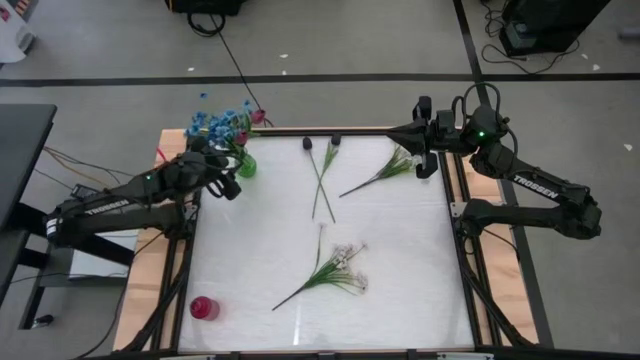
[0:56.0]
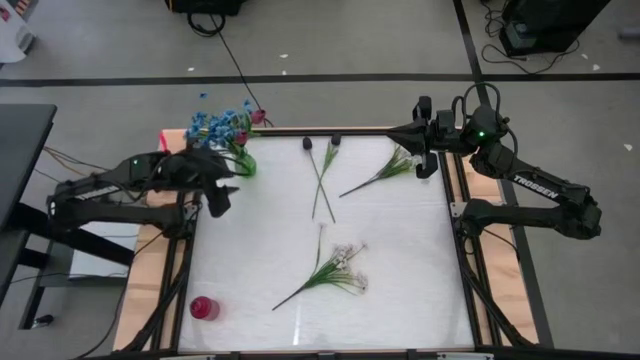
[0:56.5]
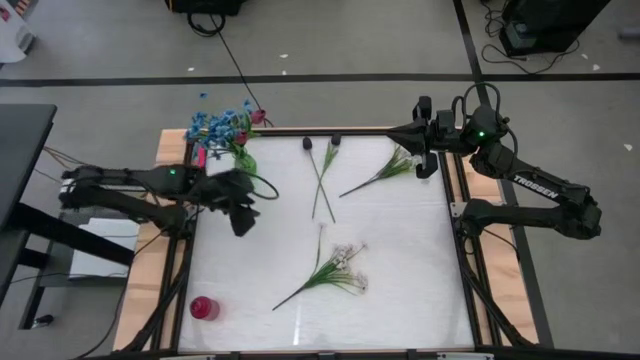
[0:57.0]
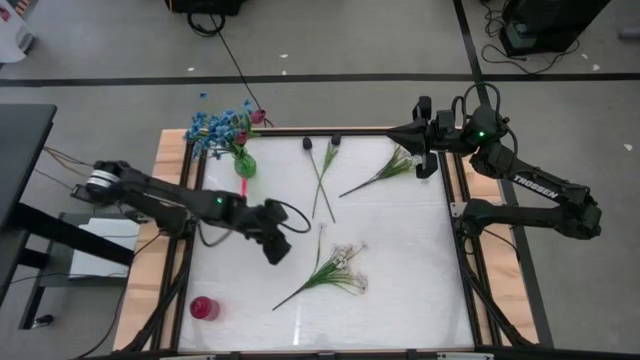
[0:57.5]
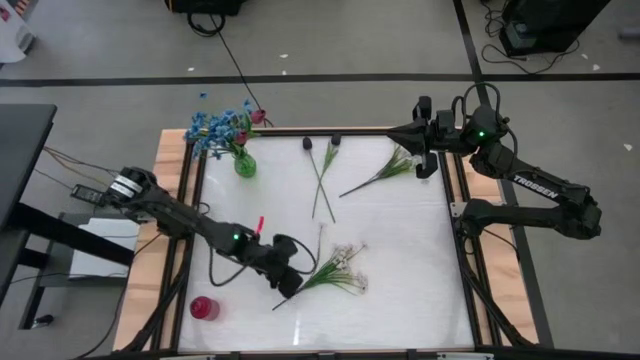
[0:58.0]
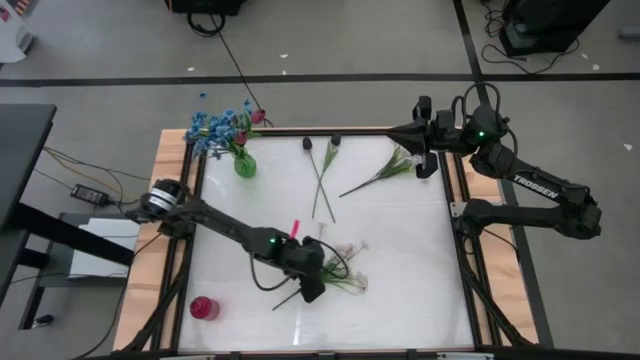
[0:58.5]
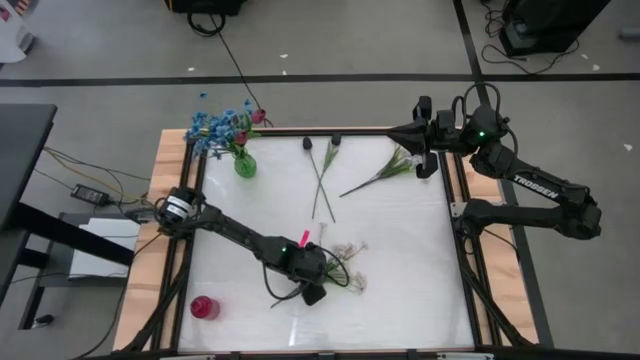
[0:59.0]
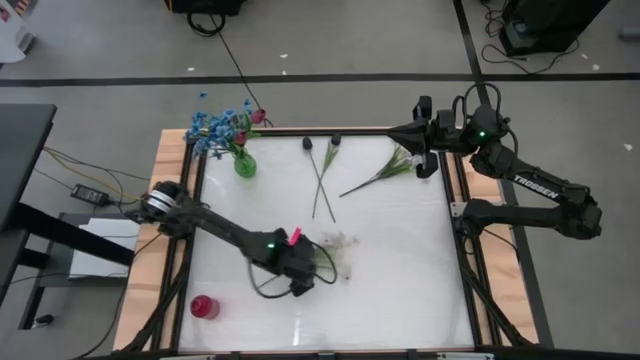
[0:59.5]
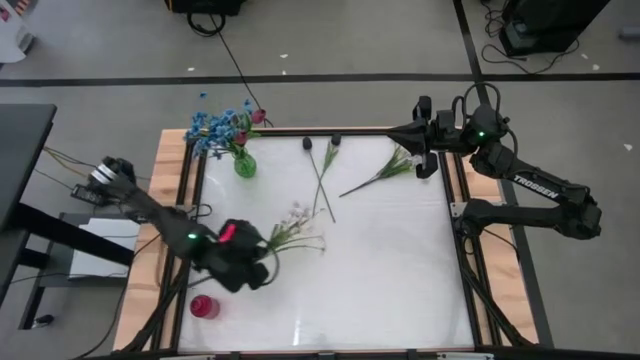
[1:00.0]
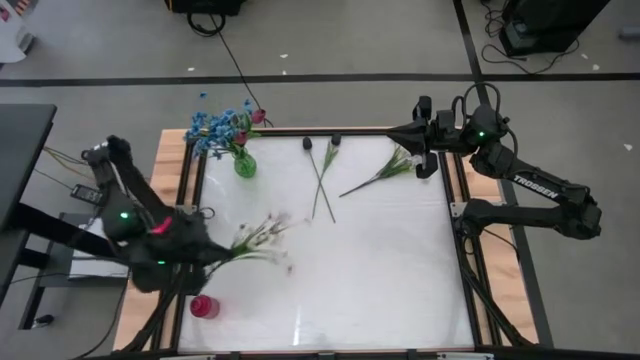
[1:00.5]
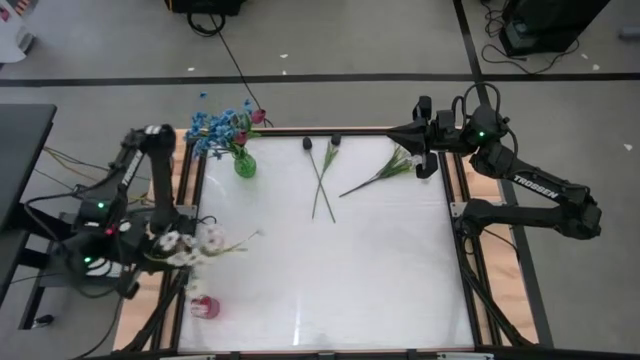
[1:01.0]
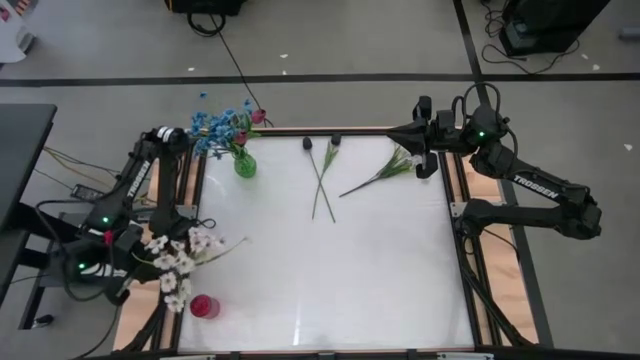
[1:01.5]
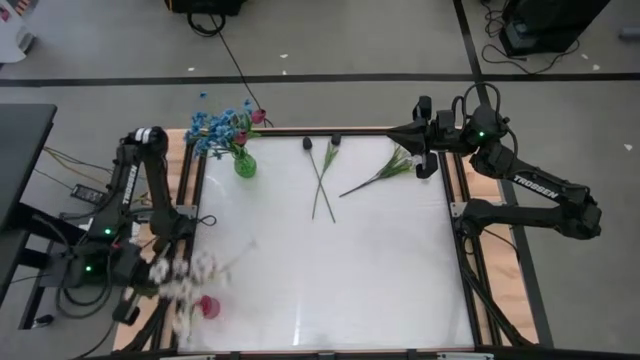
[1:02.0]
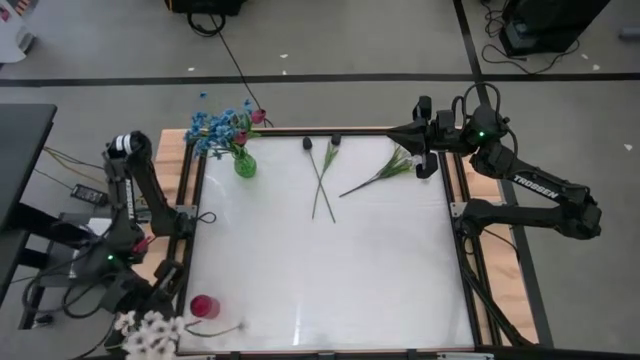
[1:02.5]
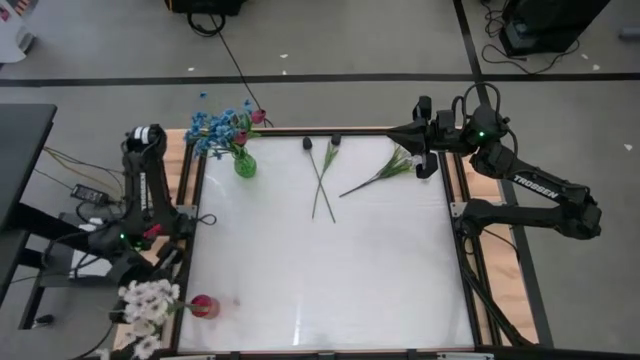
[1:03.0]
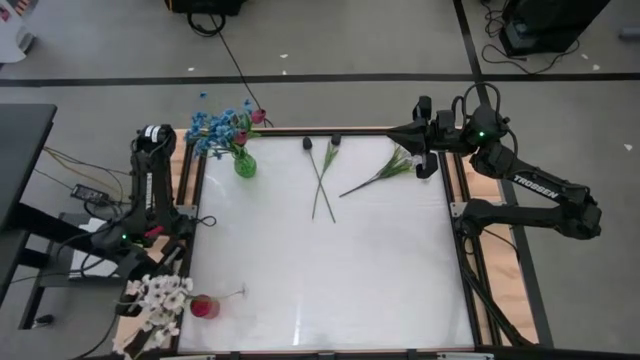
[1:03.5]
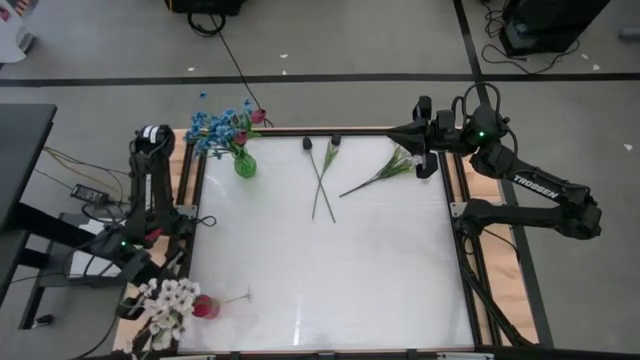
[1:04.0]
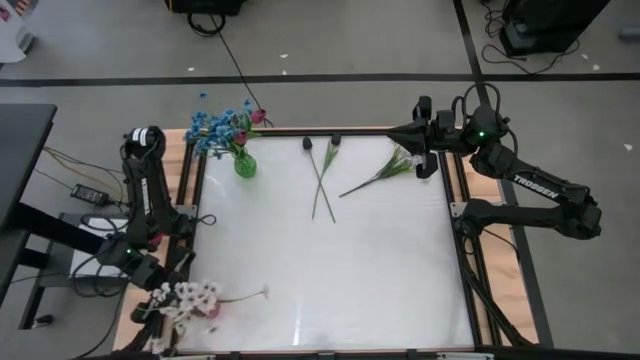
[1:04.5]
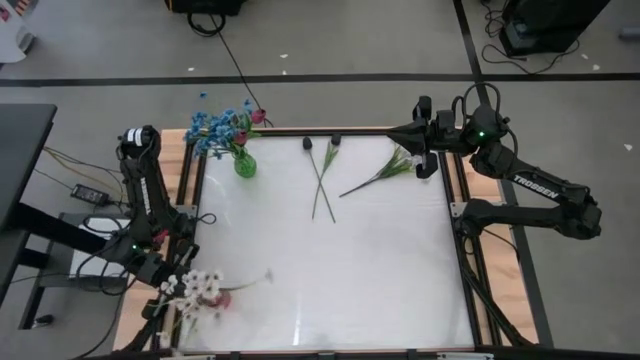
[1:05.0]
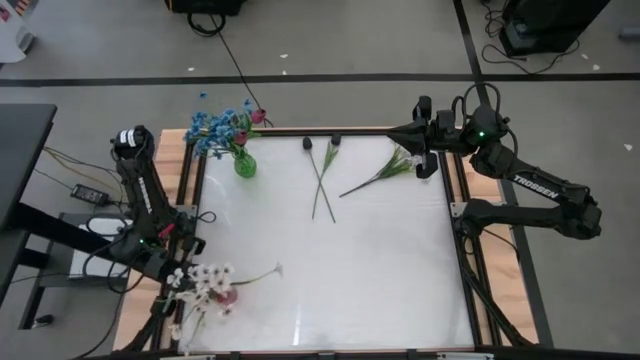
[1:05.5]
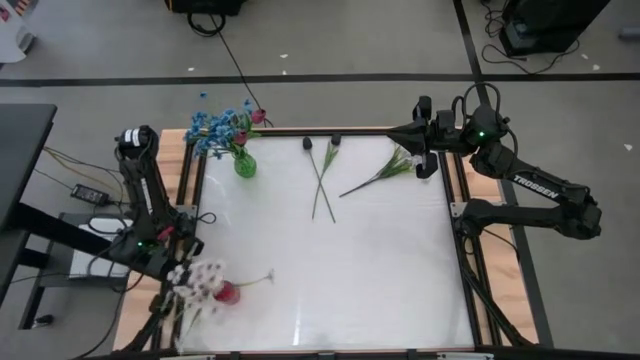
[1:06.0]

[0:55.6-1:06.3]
Task: Sort flowers into vase by color
Put the bottom white flower into the red vase

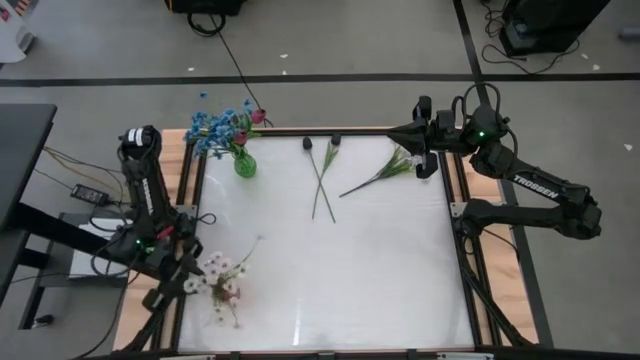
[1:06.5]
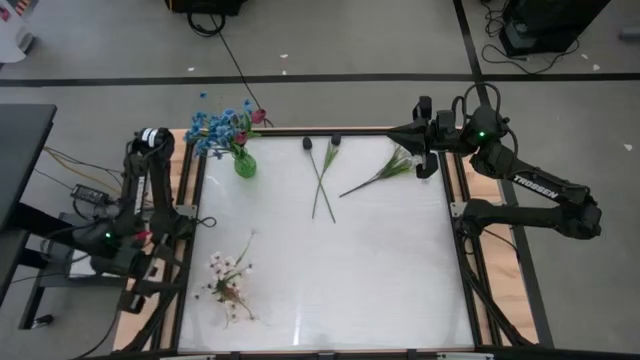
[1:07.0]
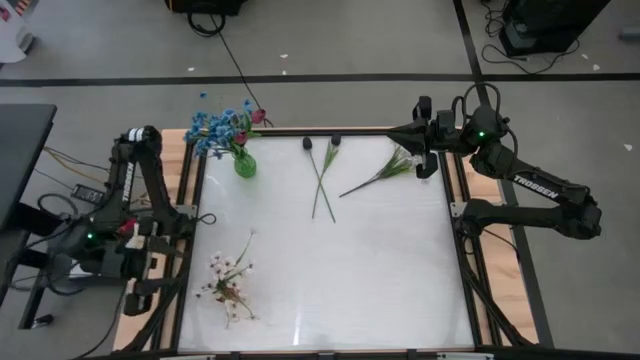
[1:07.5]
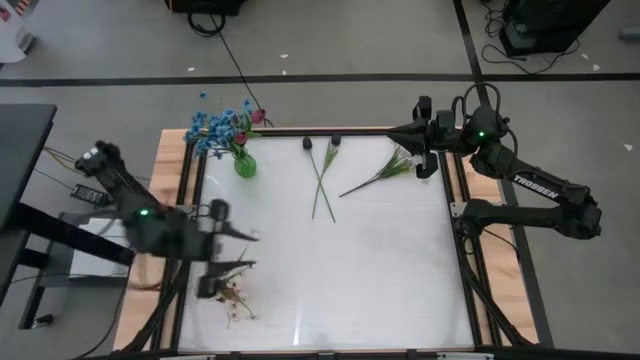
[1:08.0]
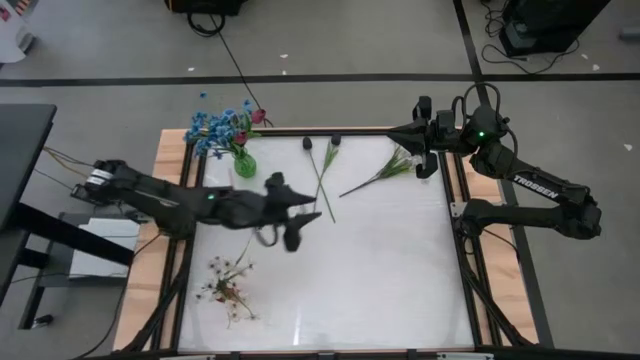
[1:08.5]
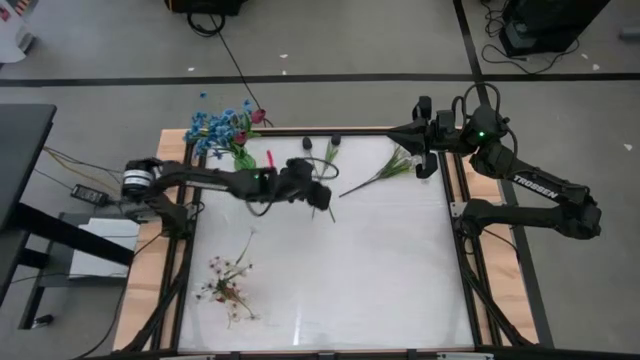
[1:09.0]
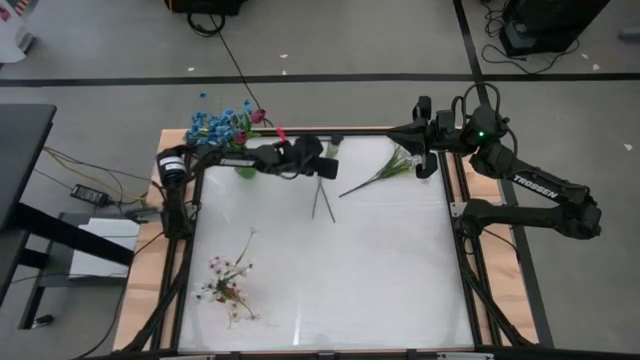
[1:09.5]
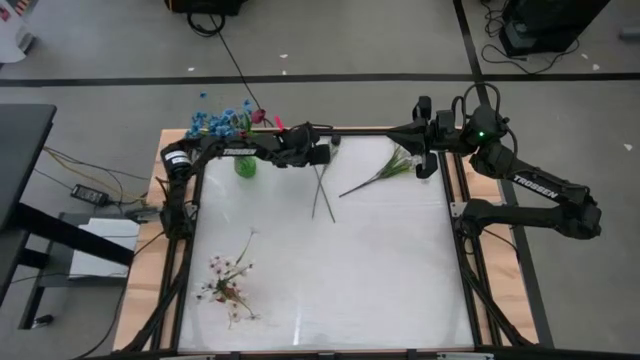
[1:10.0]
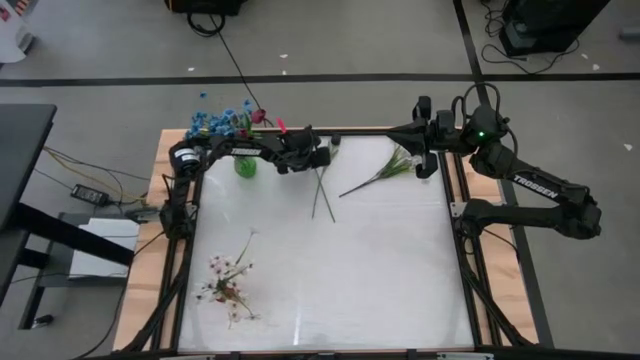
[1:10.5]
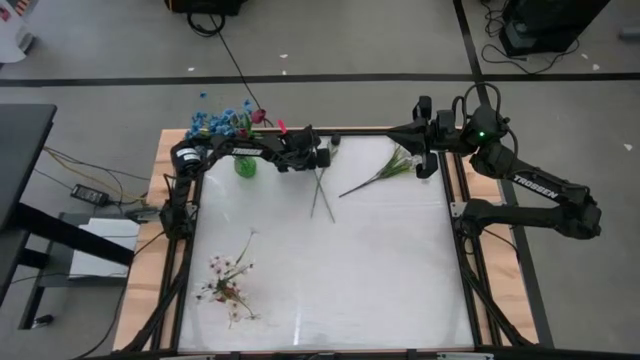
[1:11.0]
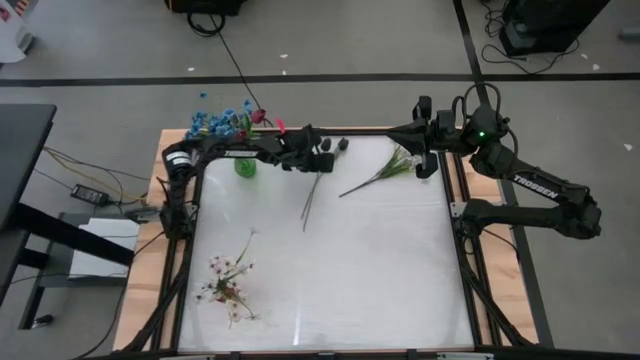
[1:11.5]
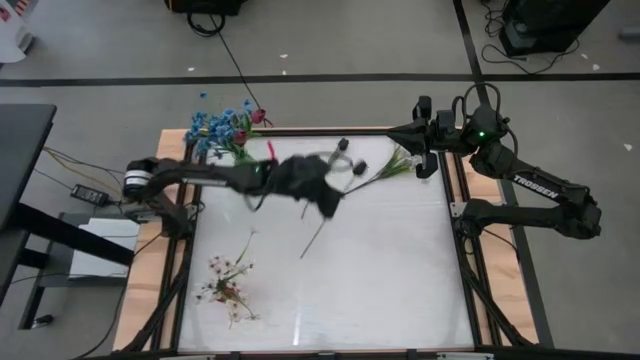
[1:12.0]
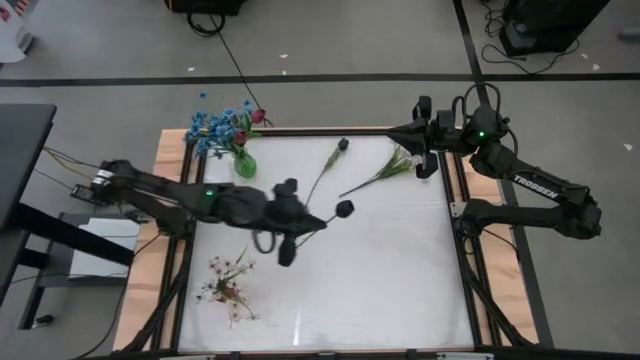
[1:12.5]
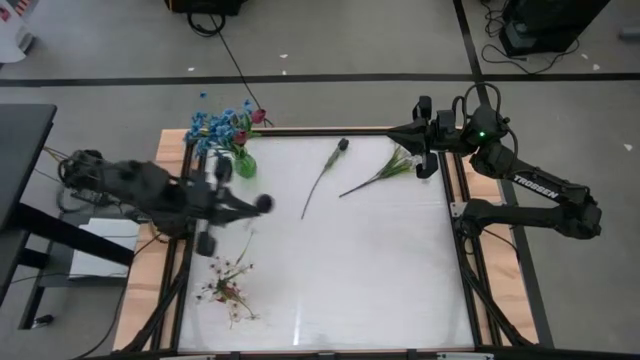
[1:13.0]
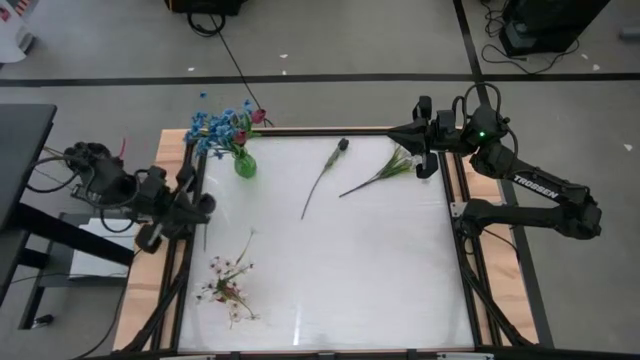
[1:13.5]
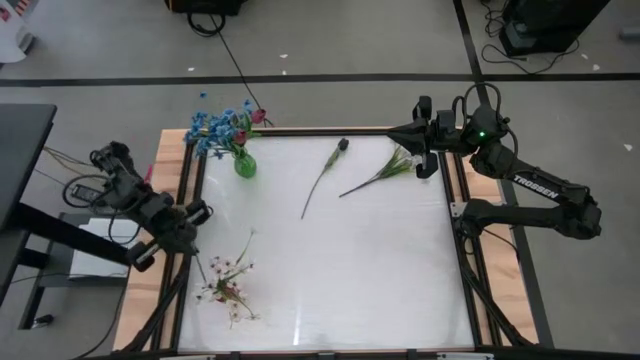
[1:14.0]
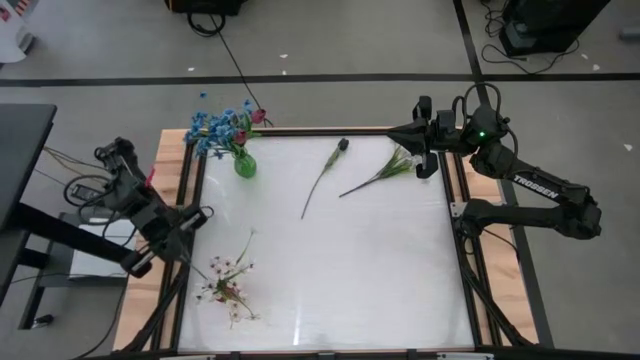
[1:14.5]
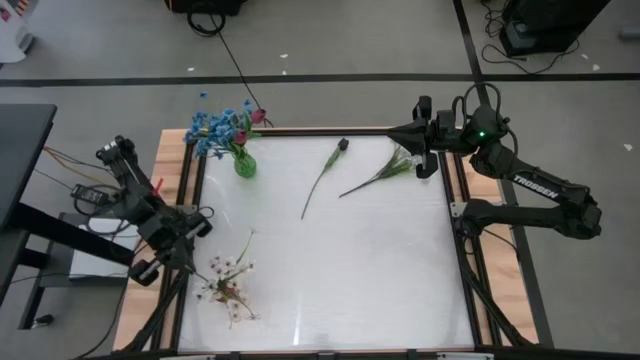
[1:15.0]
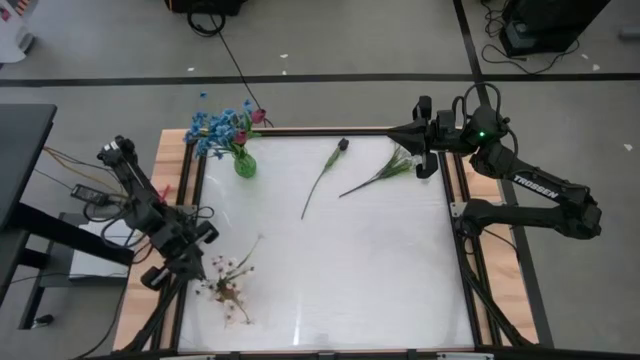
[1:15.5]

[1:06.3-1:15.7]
Put the left black flower into the red vase

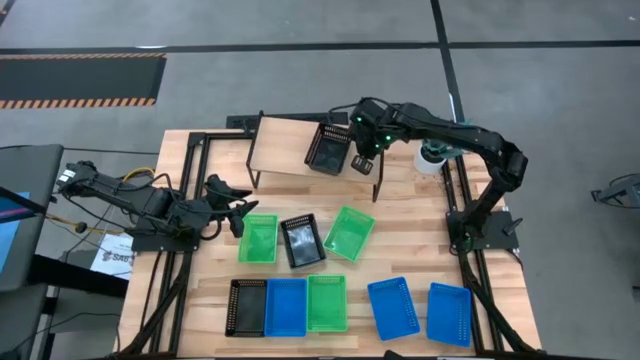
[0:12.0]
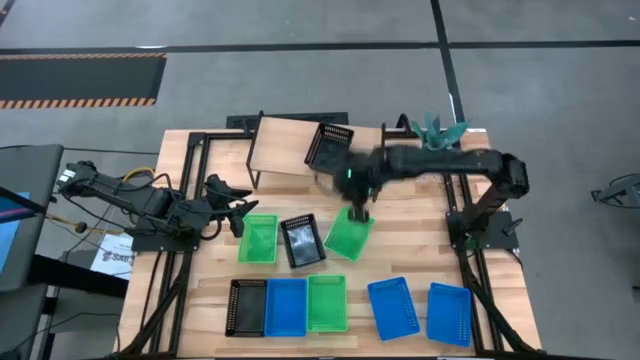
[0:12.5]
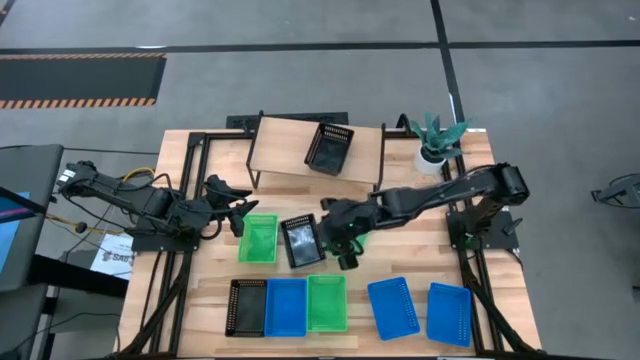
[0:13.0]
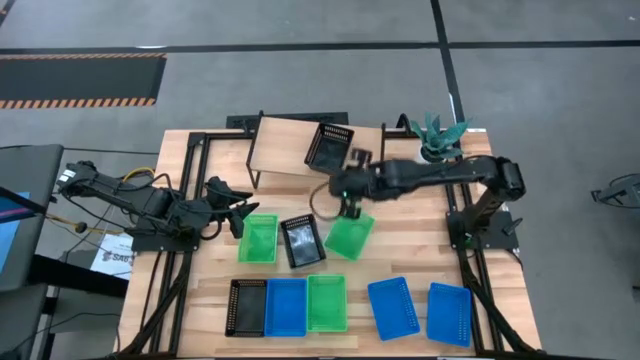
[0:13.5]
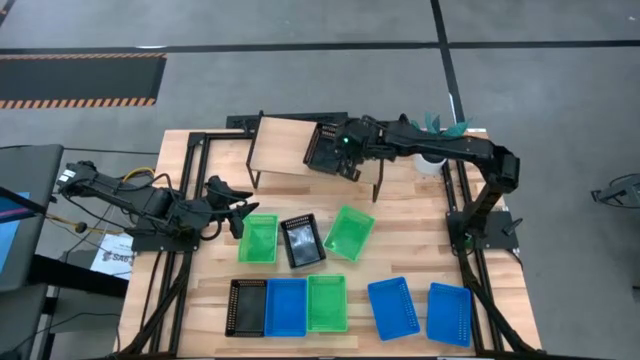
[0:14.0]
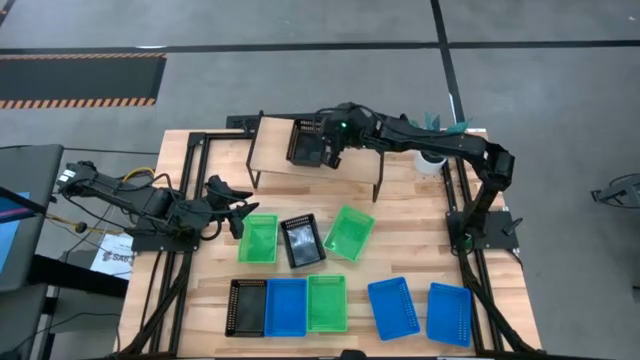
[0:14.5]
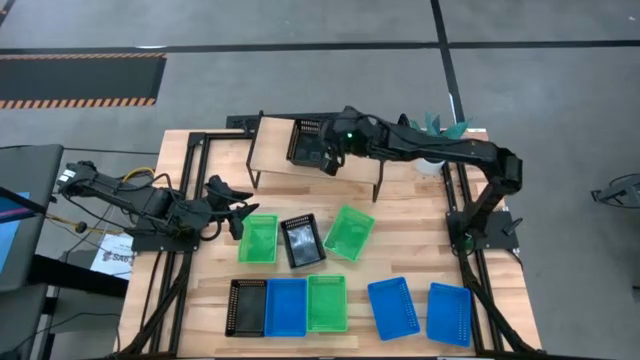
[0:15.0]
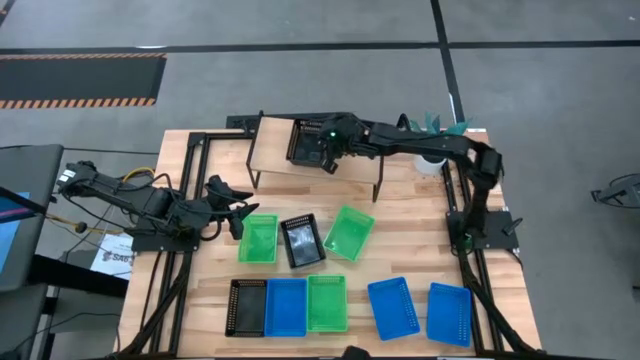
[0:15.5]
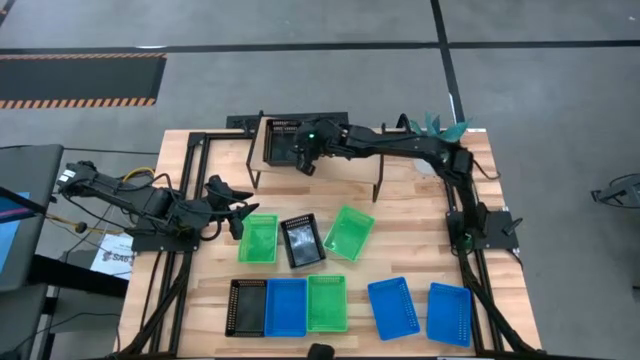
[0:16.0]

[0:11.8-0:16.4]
Task: Stack baskets on shelf by color
Adjust the black bin on the shelf
